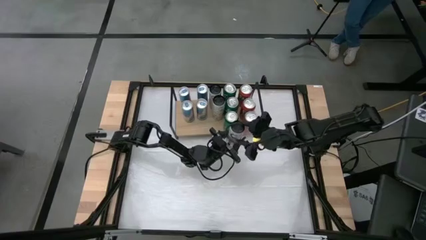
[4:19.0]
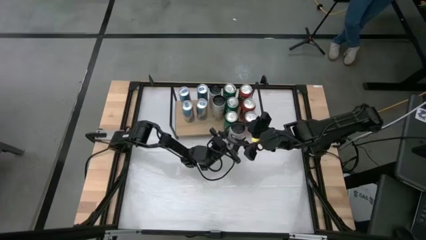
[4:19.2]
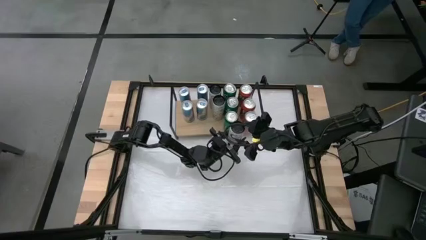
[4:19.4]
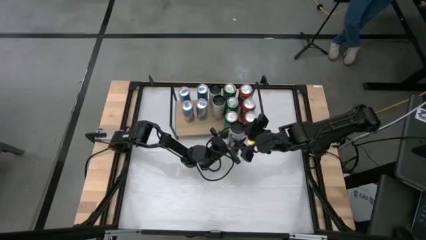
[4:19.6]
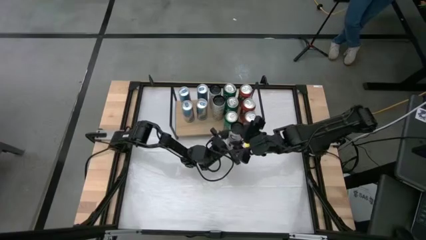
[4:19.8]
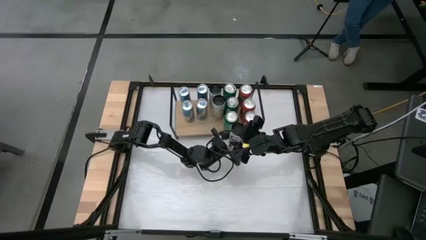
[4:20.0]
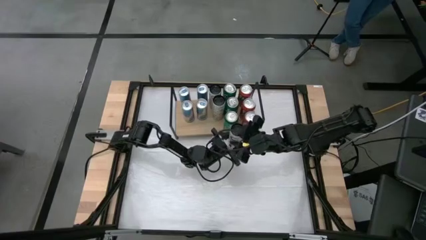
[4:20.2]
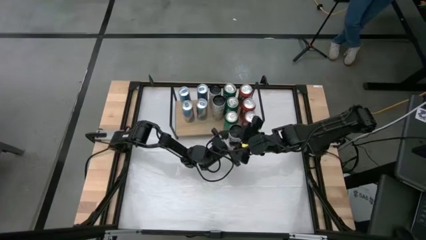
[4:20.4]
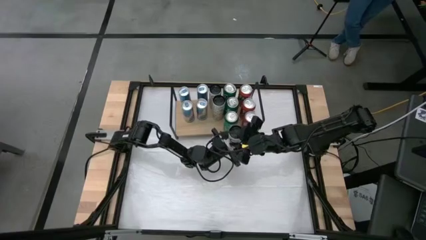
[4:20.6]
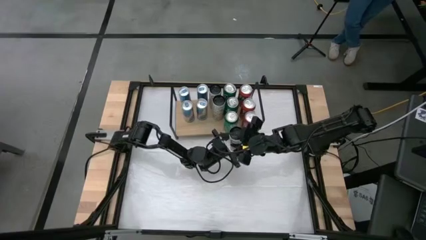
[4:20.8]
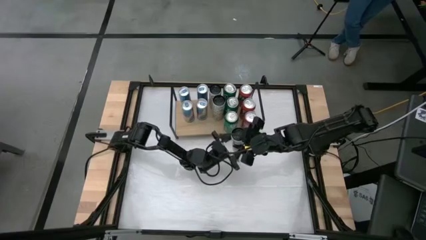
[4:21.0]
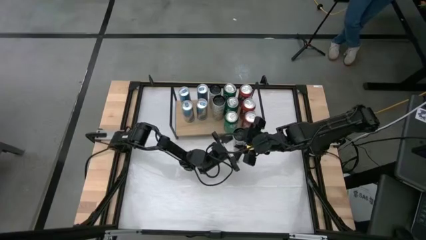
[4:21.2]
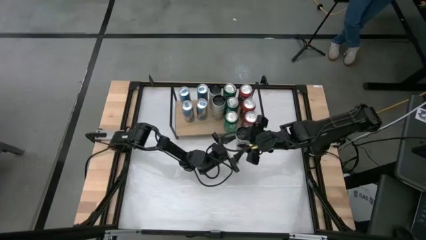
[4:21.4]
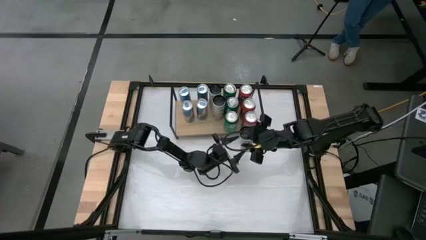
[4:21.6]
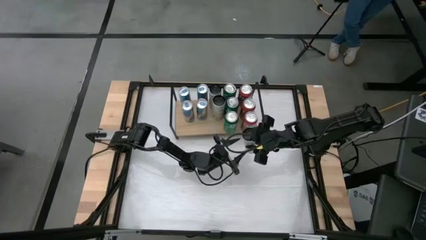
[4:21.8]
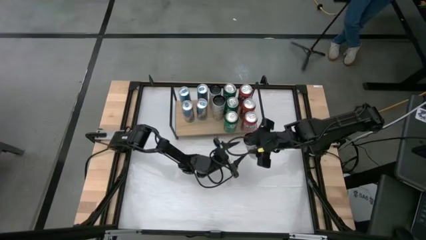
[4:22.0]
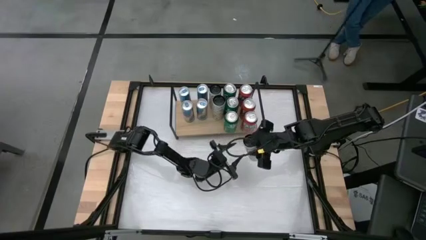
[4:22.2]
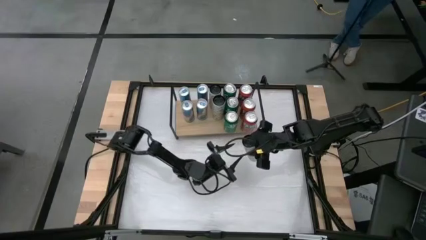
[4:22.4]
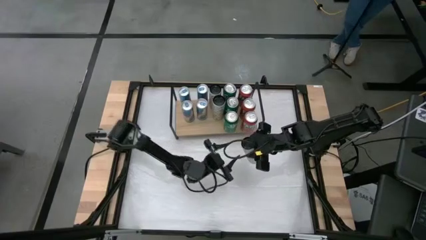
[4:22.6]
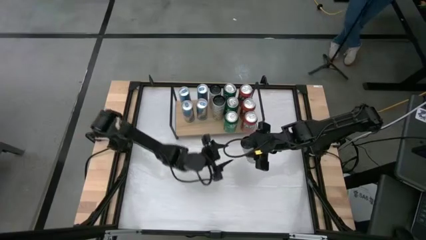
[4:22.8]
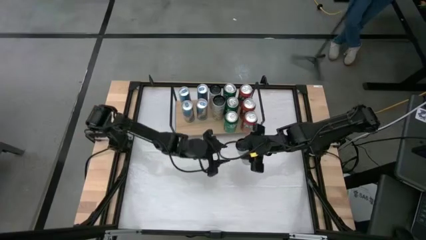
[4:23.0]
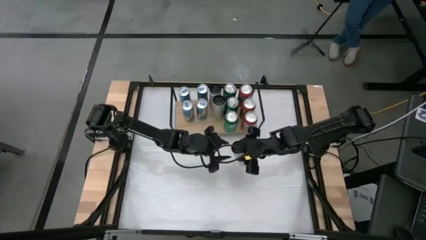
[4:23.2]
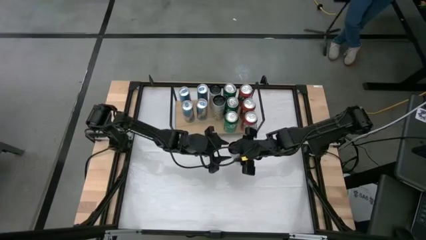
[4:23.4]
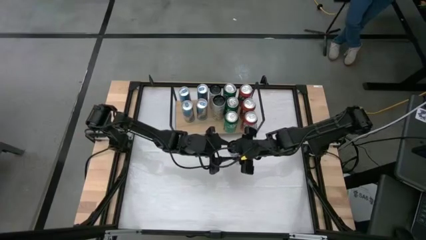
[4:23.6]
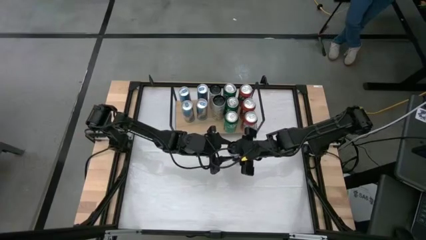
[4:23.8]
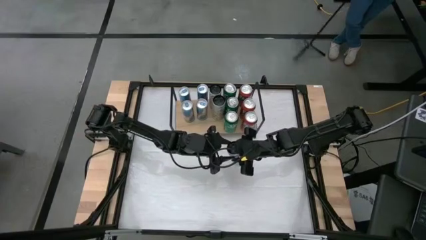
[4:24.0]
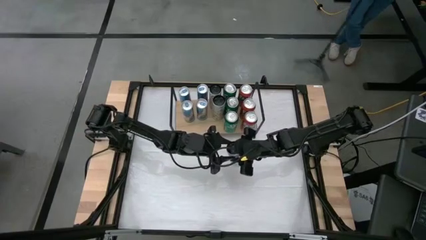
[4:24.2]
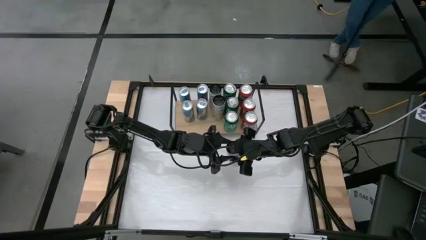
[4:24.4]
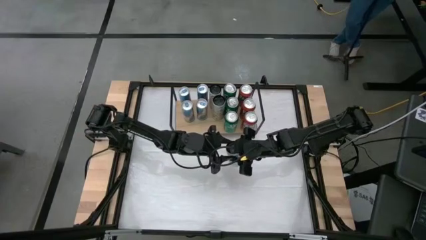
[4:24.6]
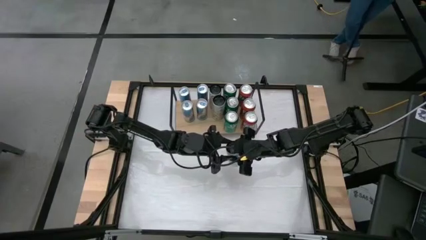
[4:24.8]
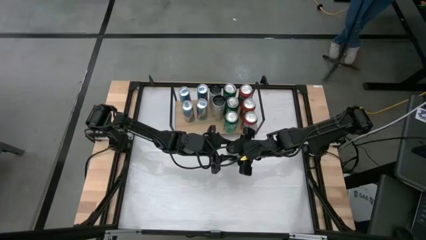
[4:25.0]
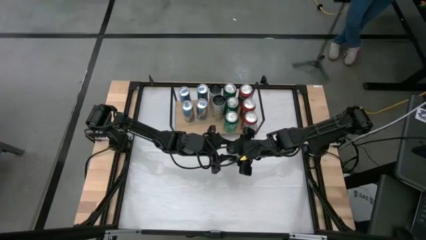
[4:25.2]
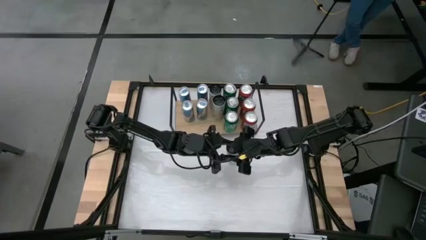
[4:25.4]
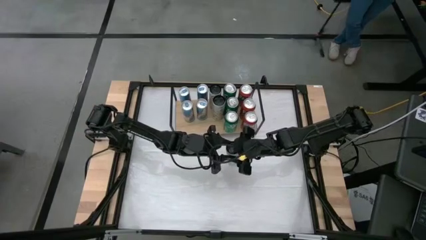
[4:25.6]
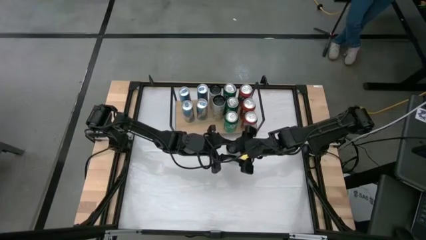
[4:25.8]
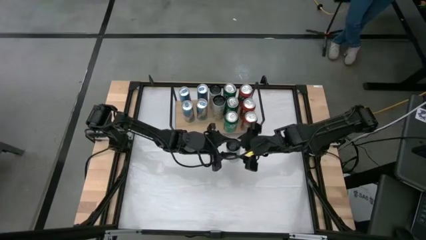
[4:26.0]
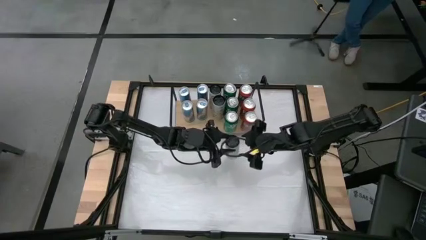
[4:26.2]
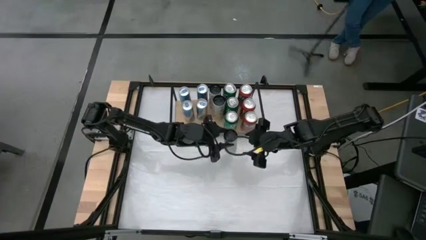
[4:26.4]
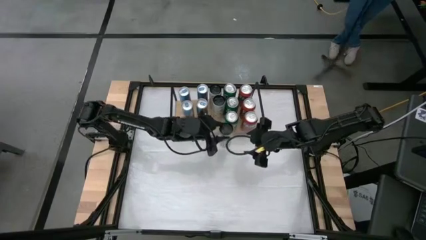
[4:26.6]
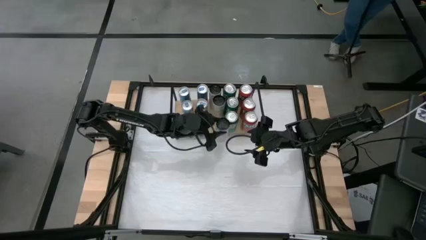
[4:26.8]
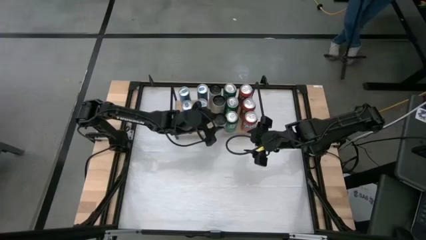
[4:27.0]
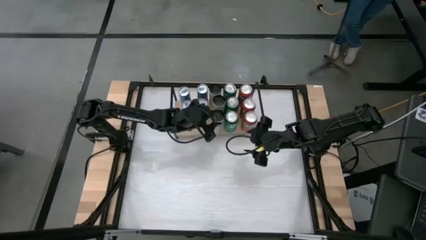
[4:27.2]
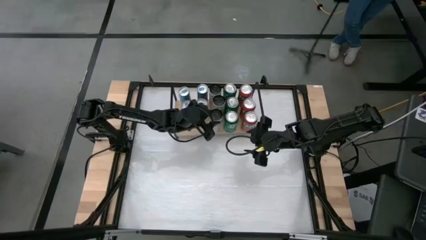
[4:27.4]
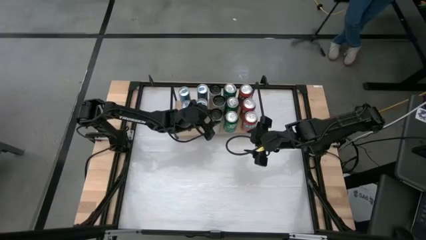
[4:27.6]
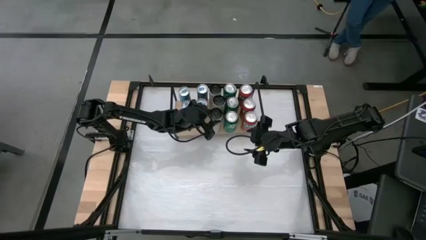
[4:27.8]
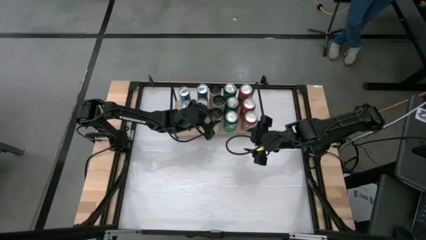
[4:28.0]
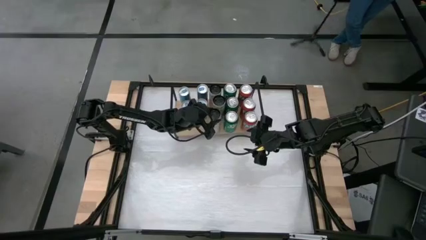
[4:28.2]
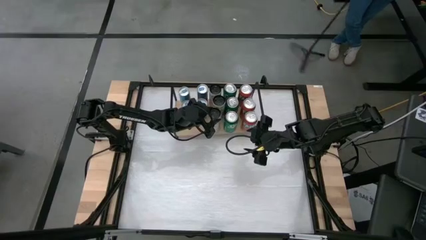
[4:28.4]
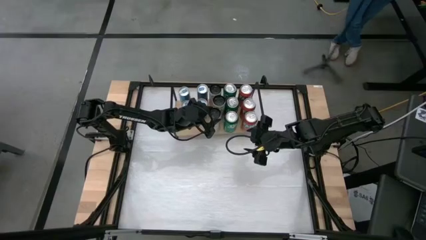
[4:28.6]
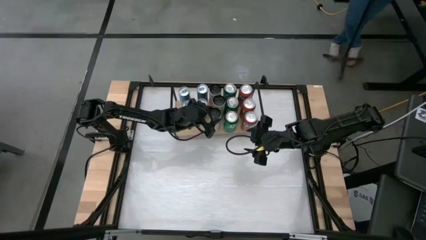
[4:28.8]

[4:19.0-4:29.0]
Task: Sort soda cans
Put the white-yellow soda can on the shelf and align with the other white-yellow soda cans

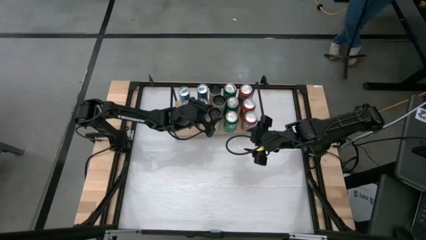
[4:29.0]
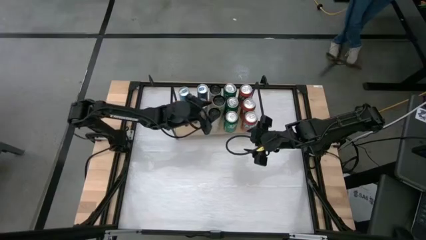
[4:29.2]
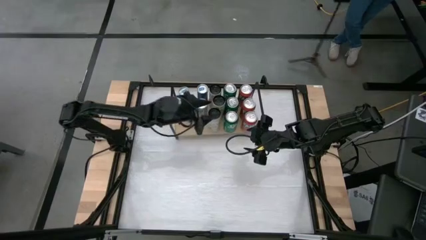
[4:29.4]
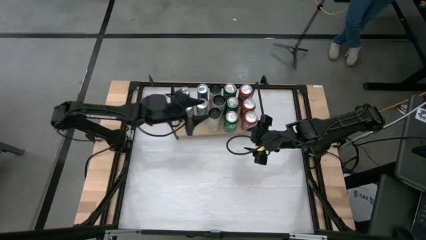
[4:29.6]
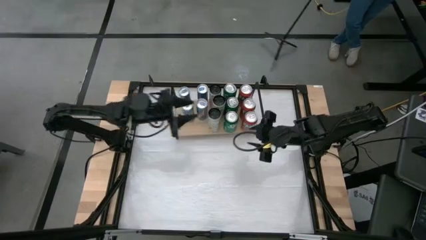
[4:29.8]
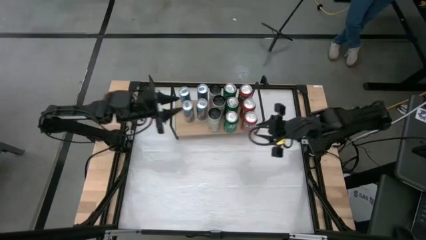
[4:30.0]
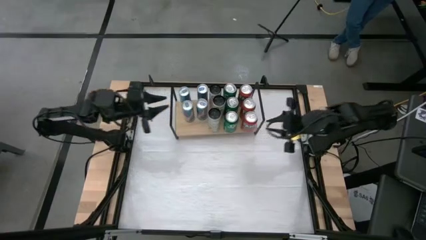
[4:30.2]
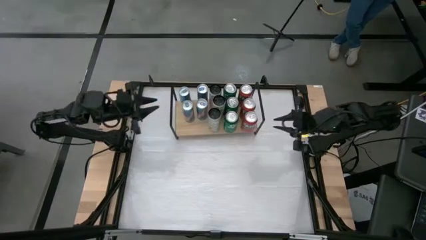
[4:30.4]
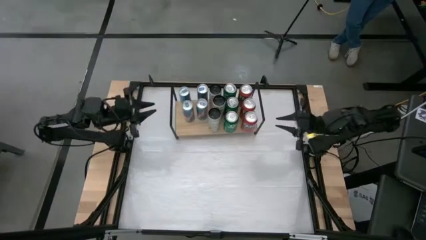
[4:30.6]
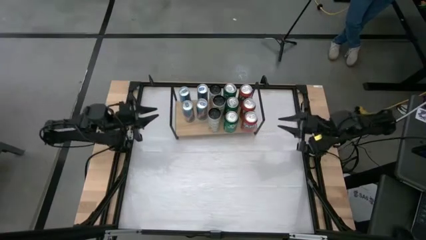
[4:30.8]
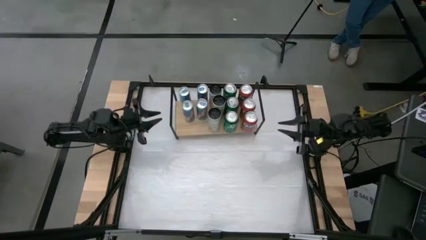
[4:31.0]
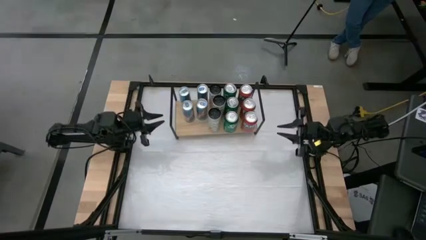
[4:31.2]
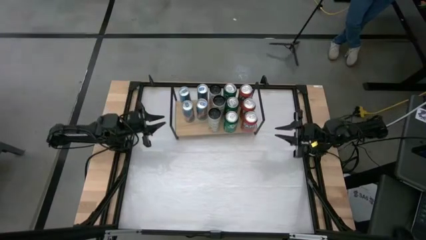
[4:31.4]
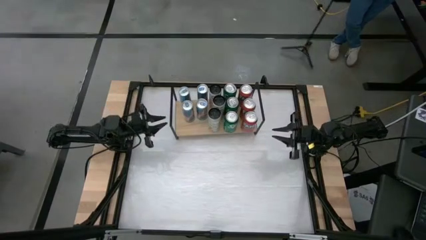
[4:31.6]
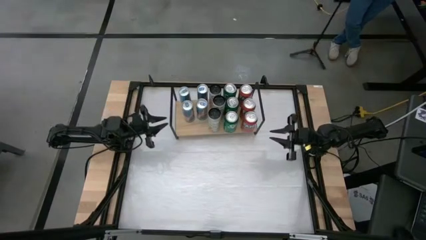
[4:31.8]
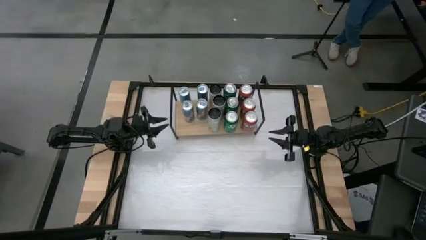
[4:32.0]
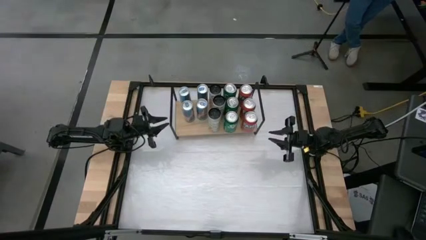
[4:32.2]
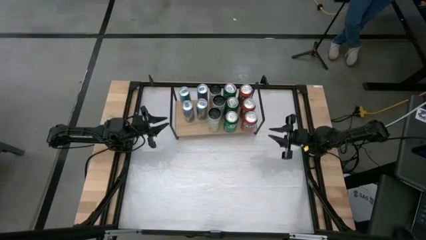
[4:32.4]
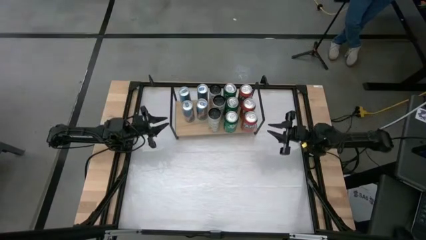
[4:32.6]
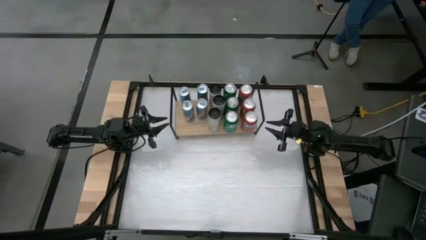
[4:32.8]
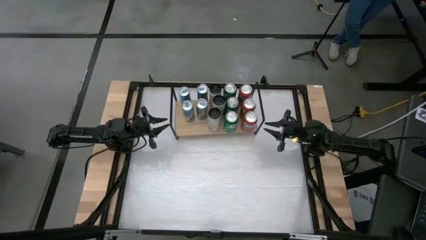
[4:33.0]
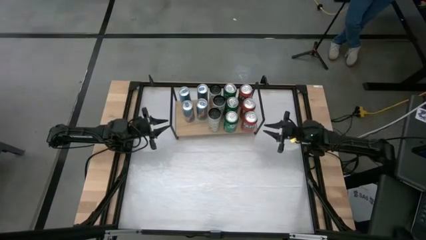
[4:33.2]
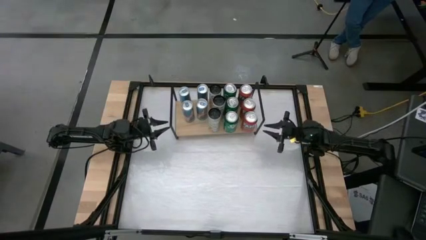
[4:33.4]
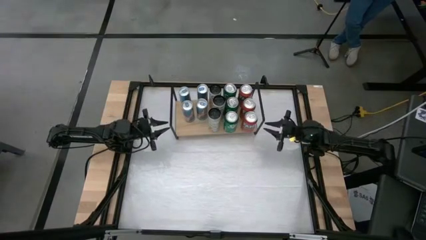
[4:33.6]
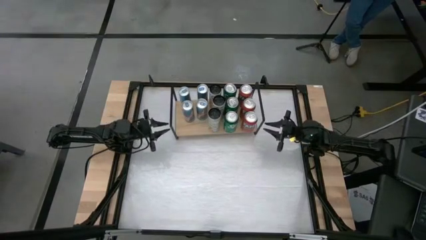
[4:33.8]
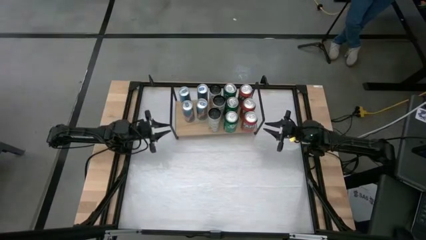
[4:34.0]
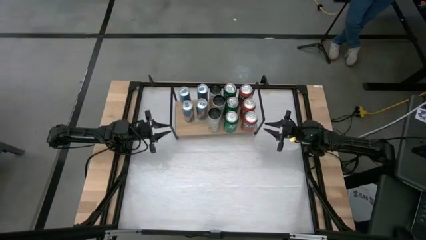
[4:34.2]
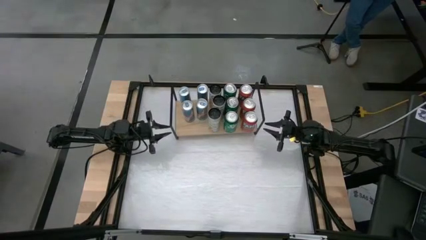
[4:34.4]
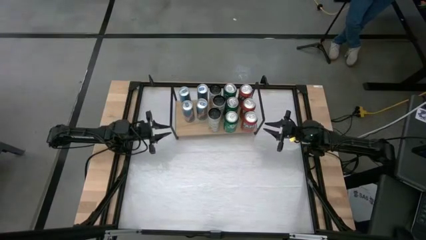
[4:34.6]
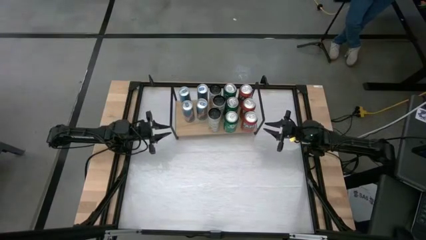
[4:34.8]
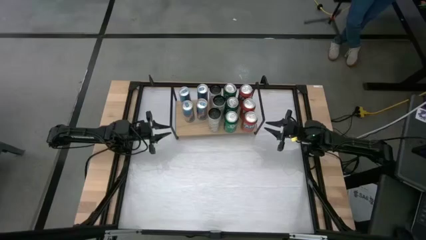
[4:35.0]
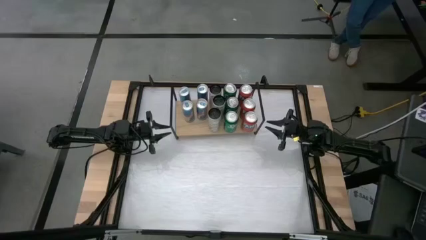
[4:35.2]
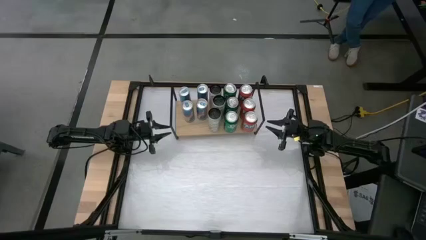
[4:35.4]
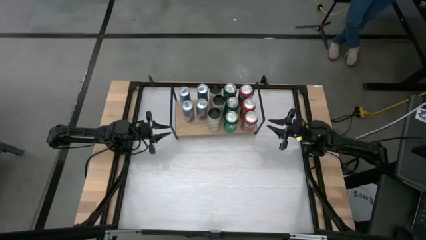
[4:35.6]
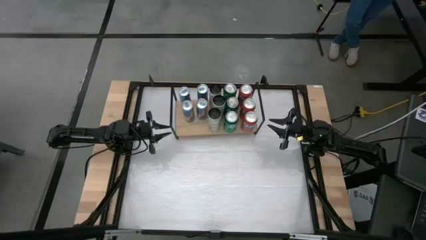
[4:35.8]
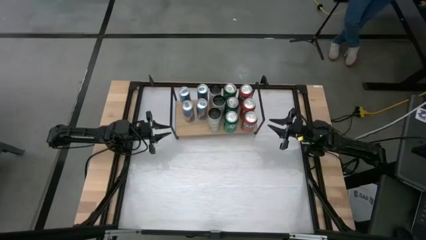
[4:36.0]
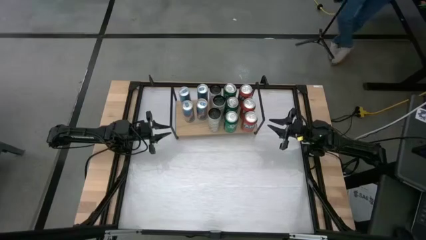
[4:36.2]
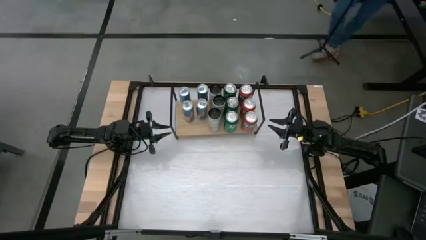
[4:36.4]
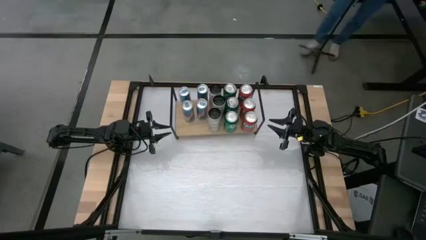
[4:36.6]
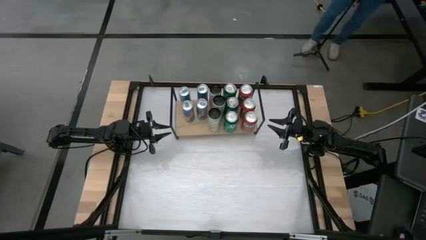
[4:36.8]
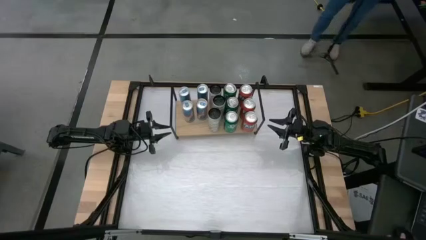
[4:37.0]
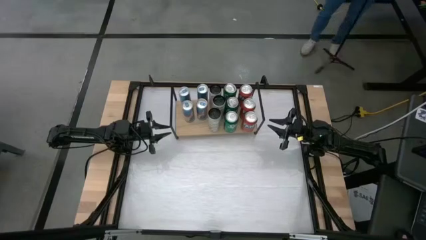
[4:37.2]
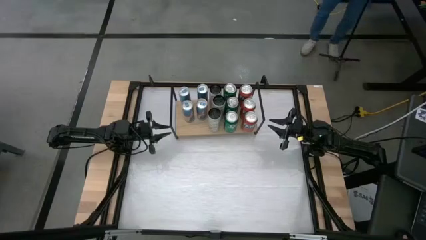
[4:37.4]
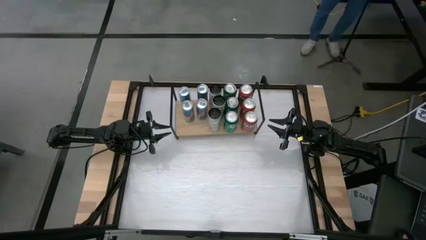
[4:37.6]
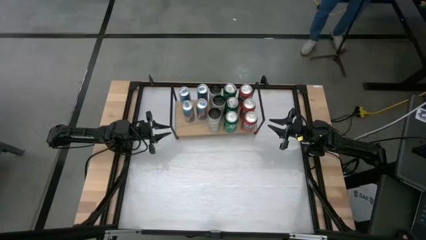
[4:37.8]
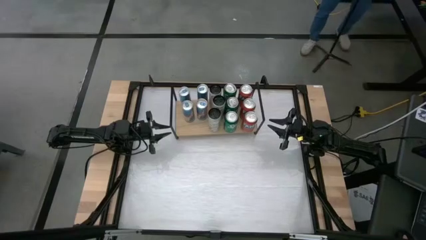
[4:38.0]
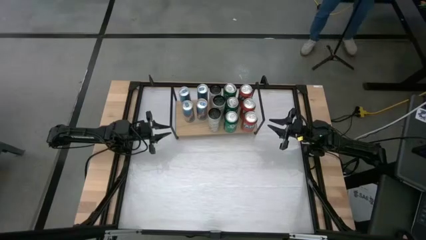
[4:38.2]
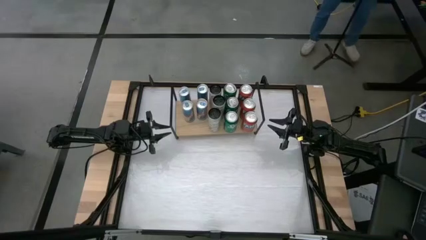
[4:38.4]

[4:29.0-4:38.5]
Return to Home Position
